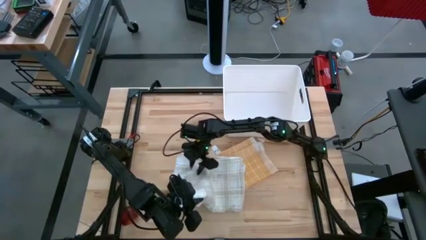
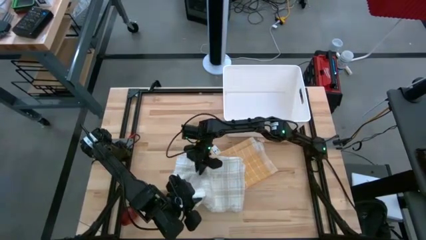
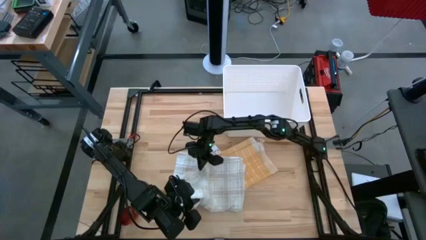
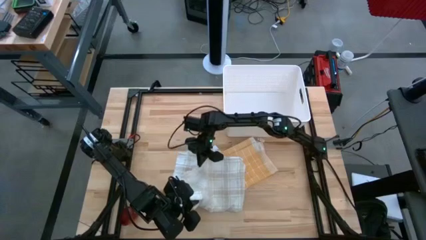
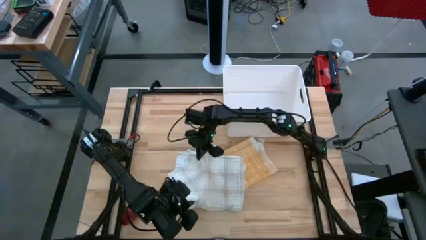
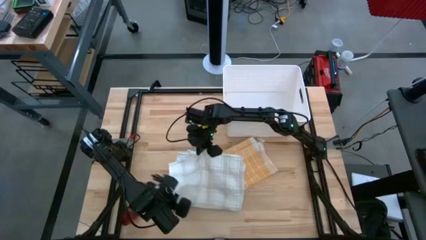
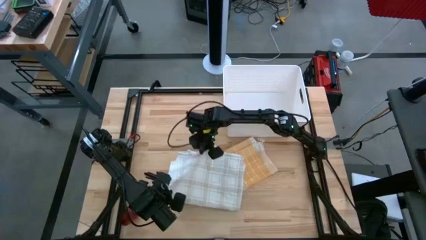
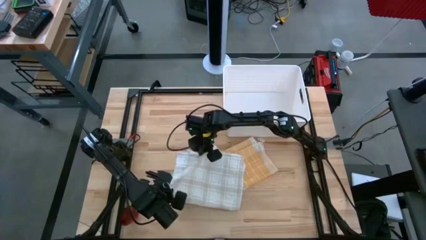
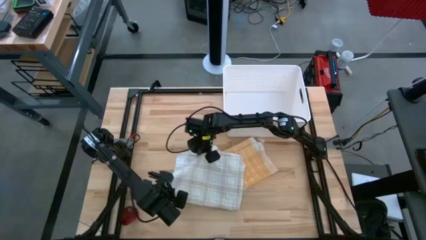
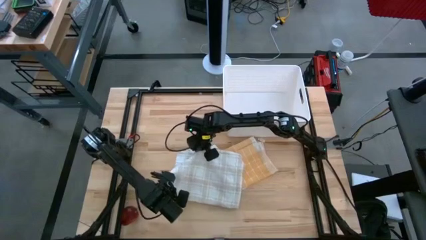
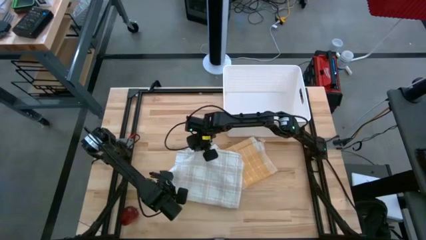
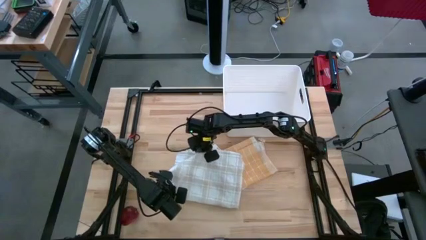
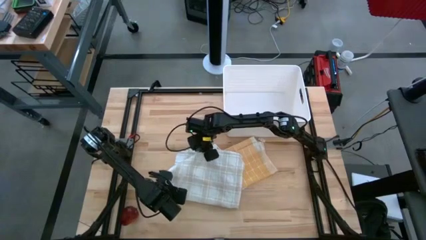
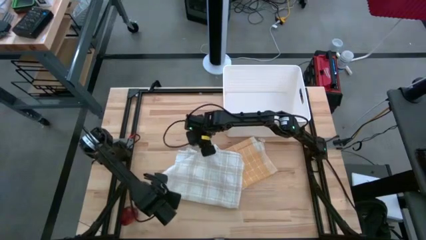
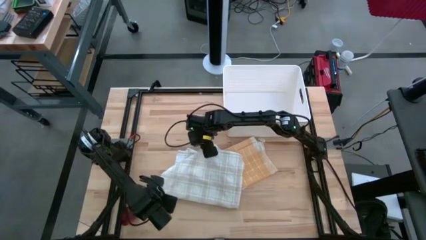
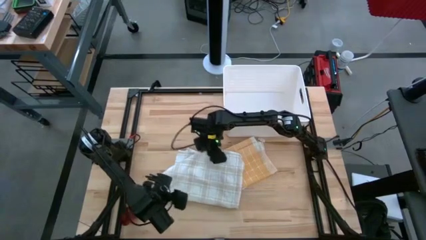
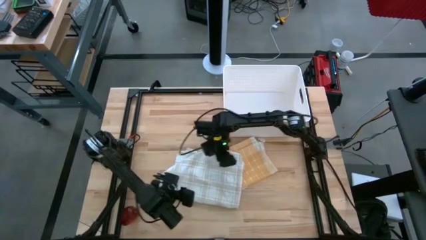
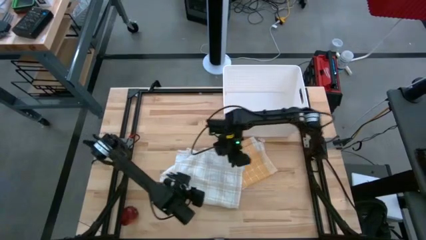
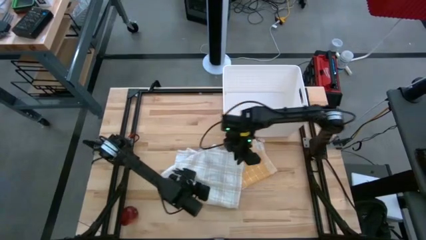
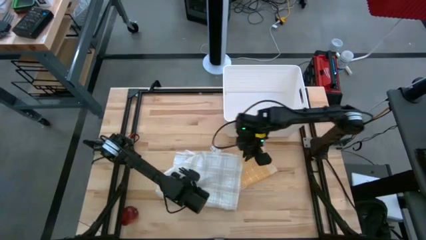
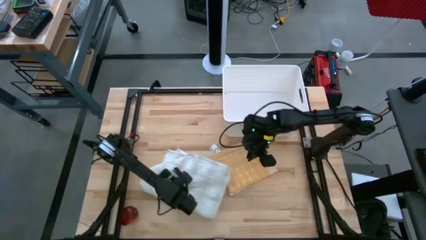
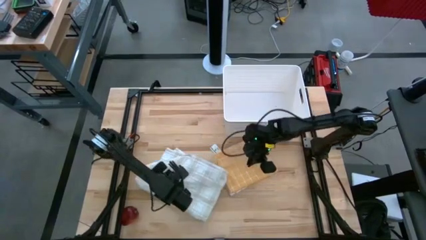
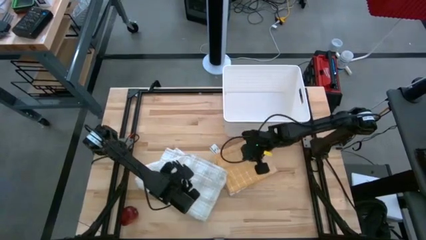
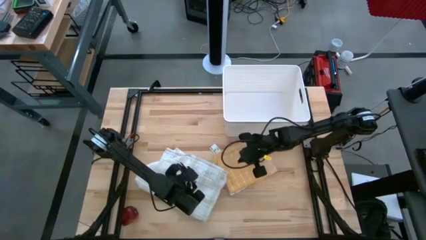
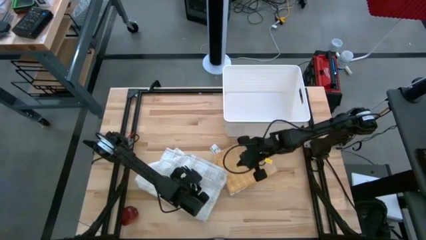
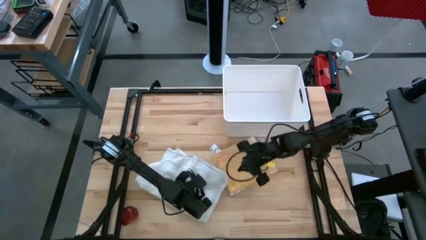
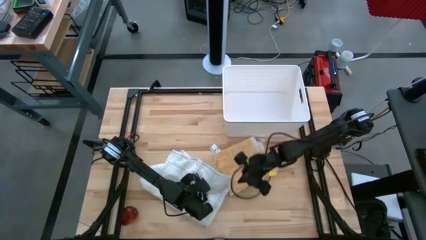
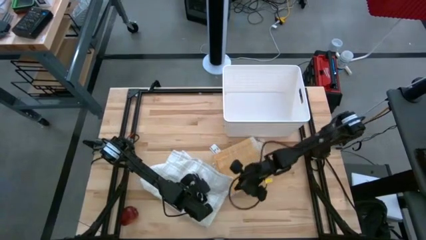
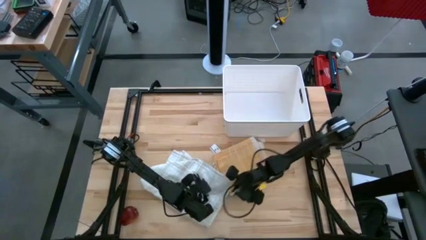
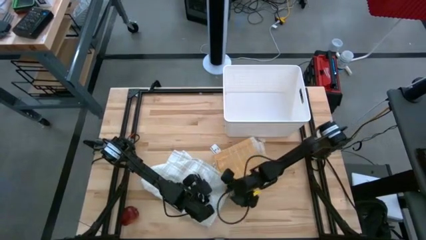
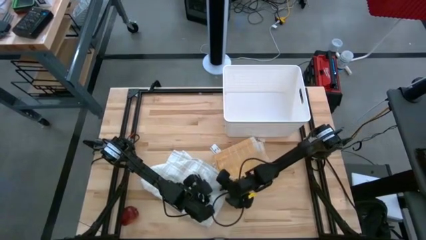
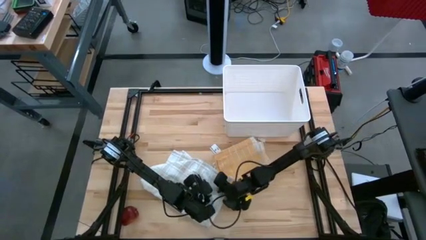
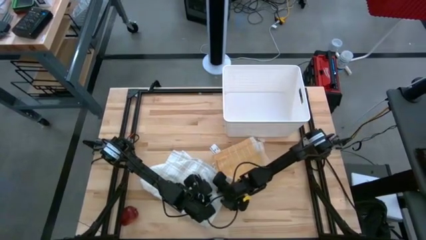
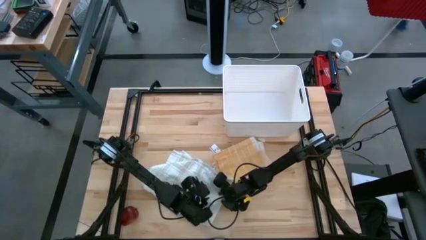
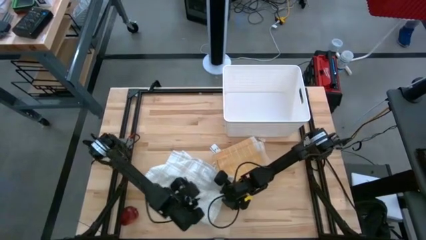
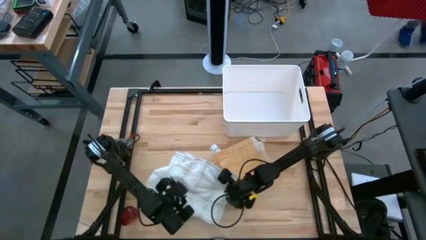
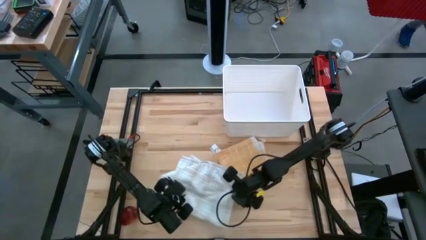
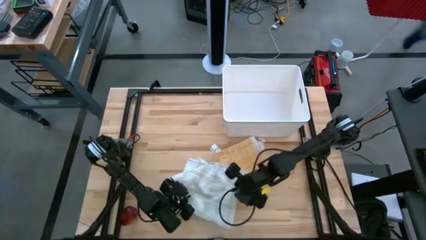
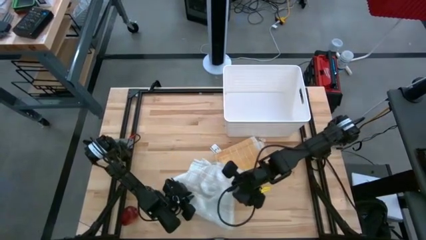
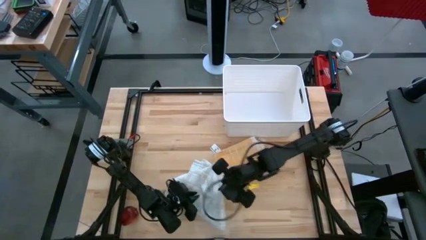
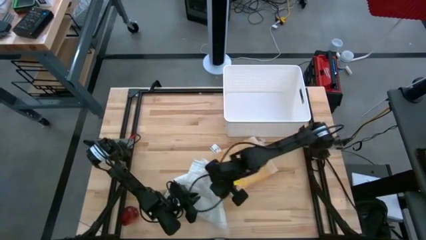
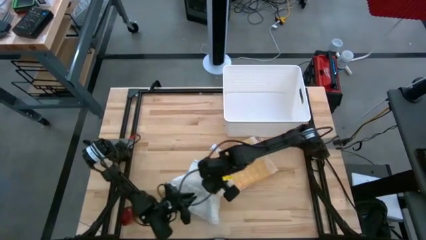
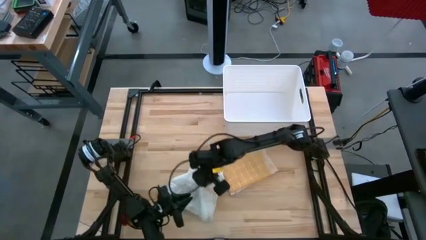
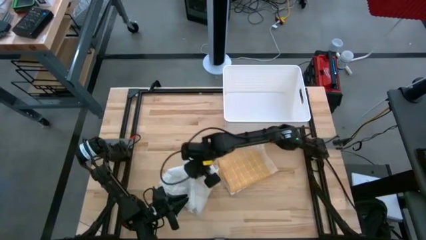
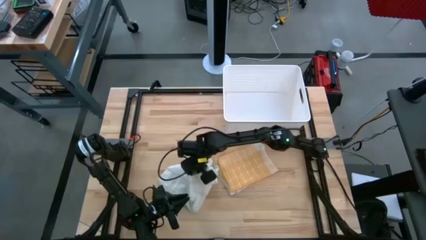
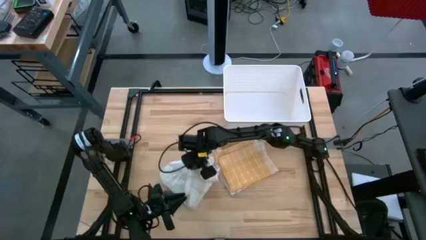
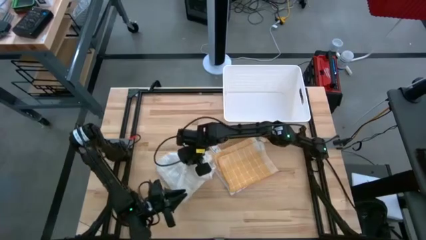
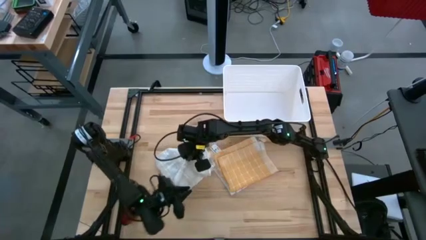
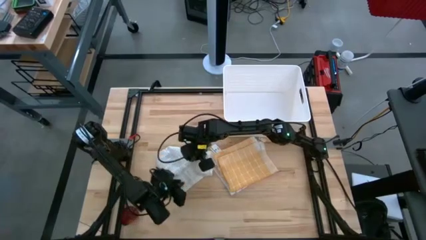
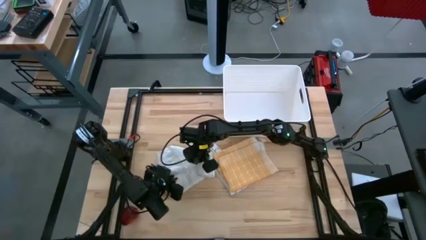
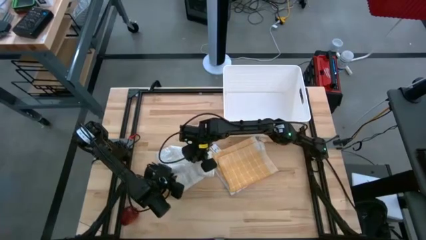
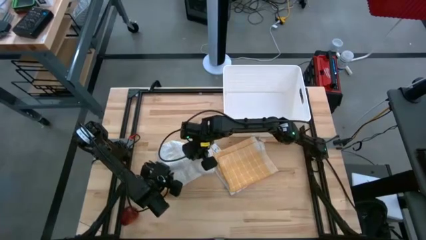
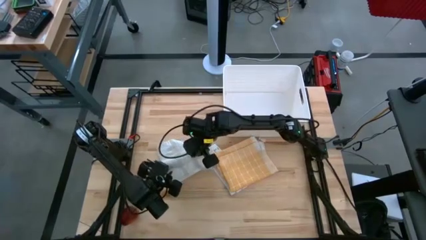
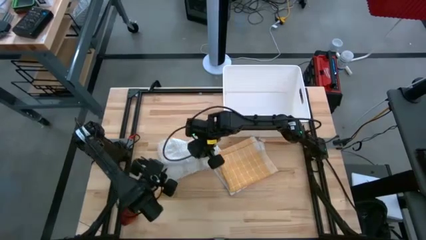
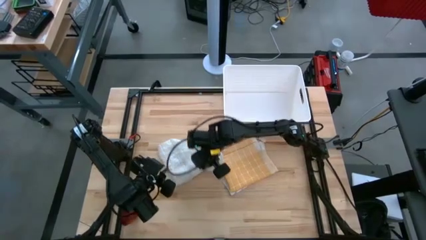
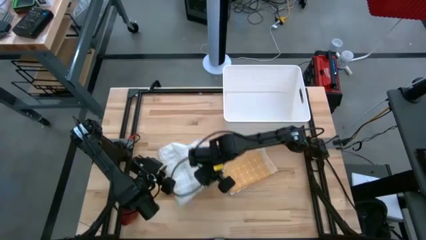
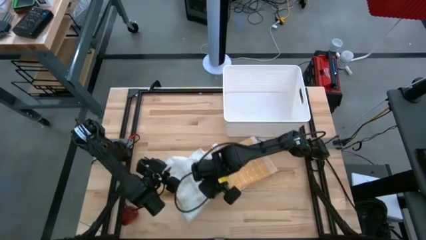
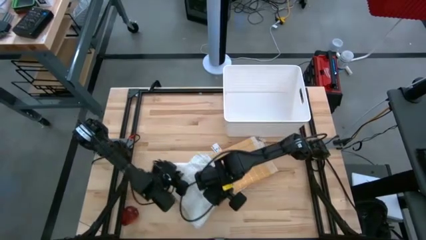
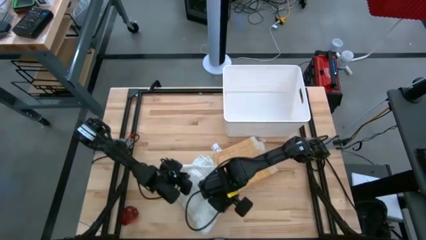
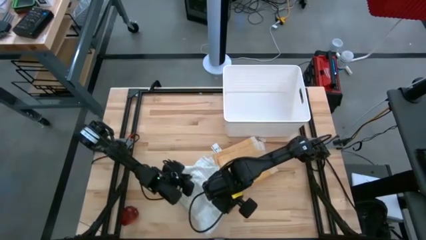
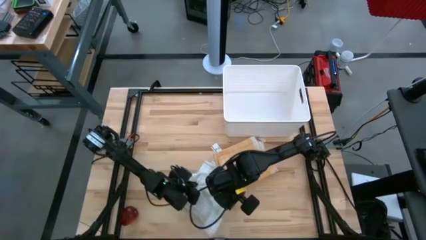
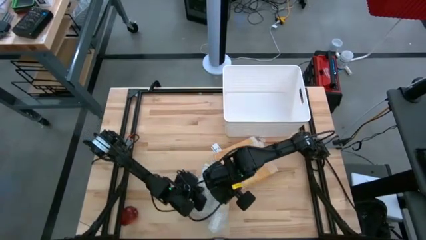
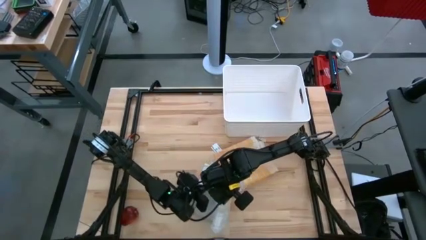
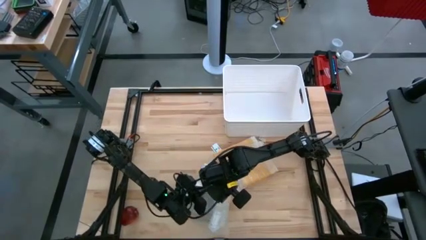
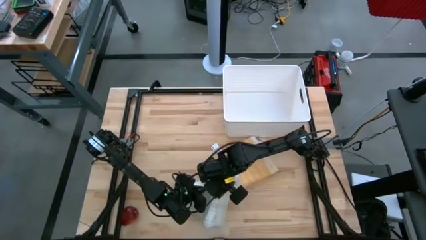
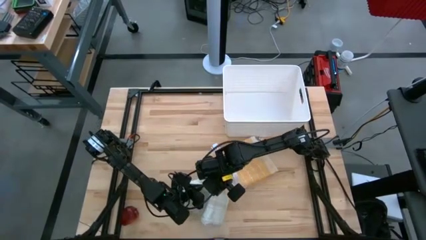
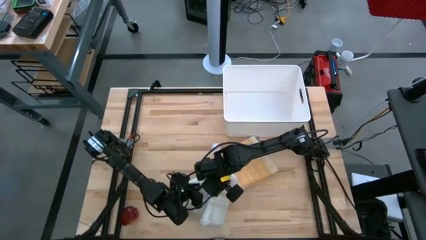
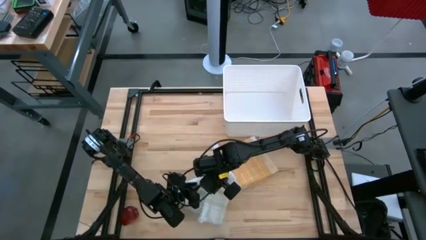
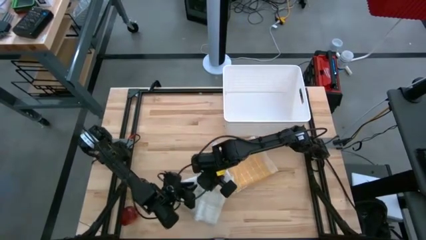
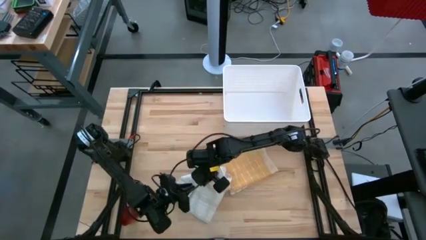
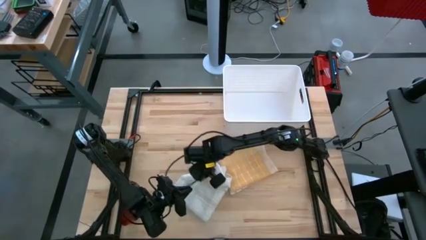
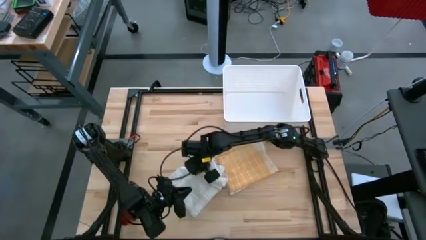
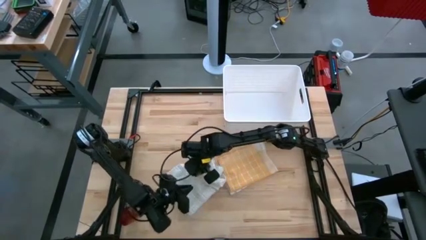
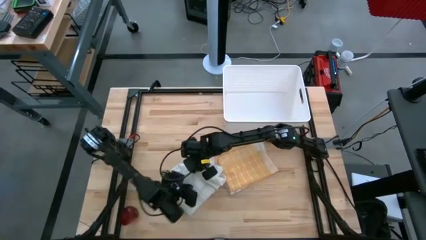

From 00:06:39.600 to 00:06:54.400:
Task: Fold towel
Fold the white checkered towel

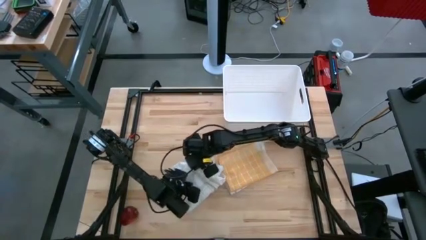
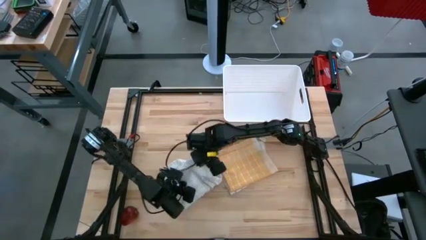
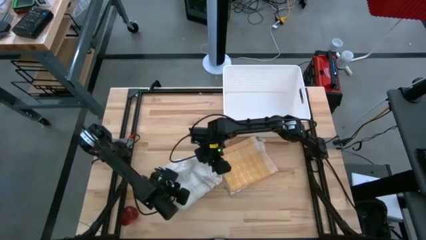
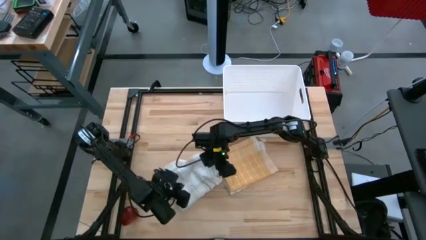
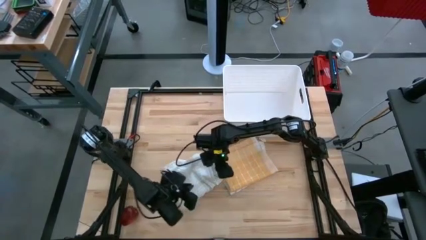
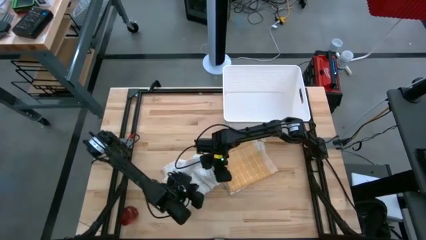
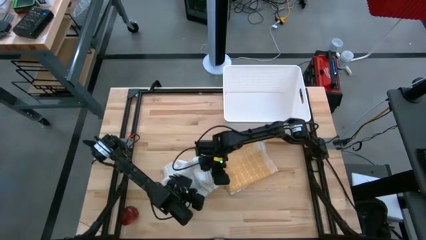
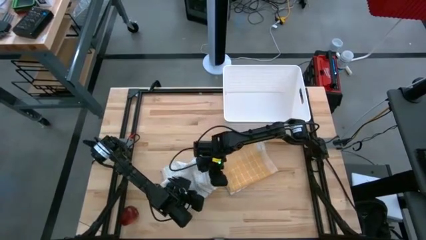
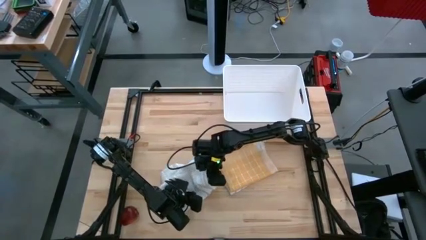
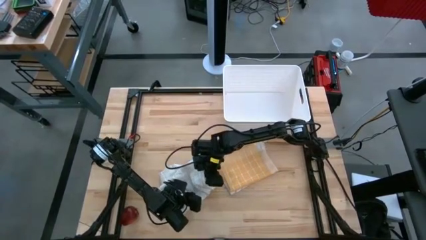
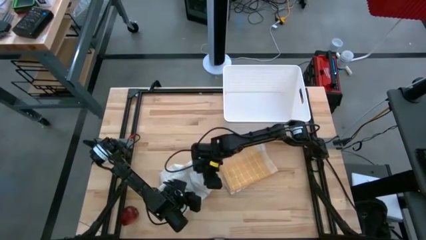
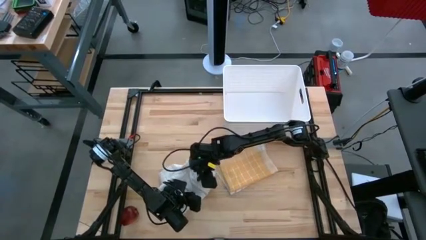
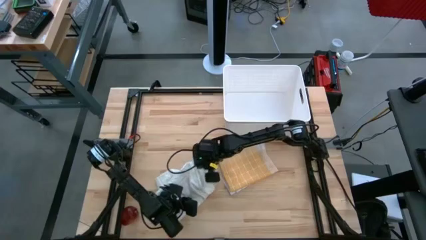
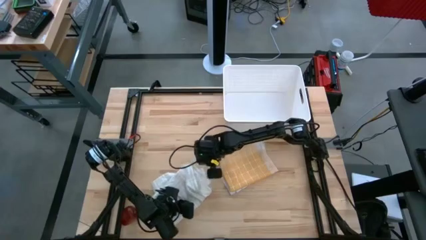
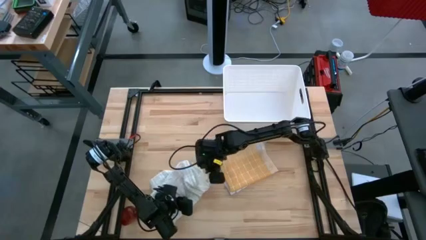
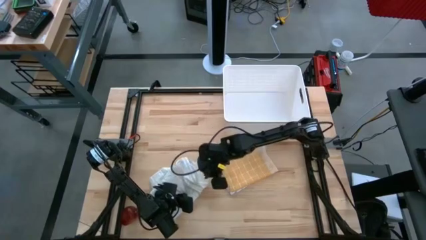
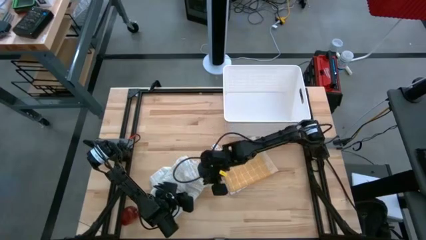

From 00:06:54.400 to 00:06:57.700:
Fold the white checkered towel
